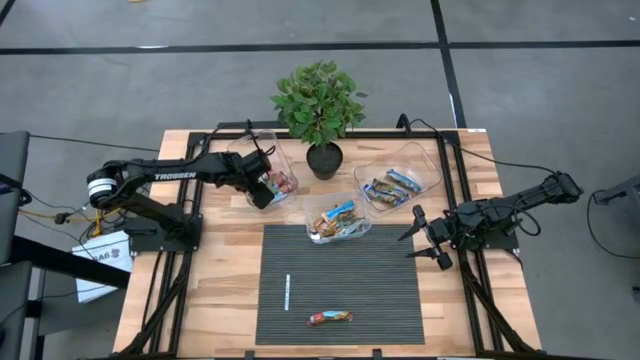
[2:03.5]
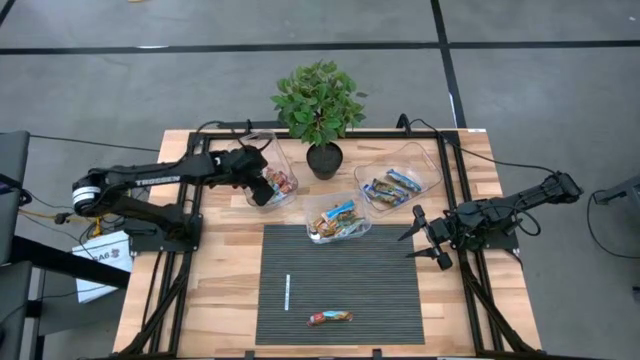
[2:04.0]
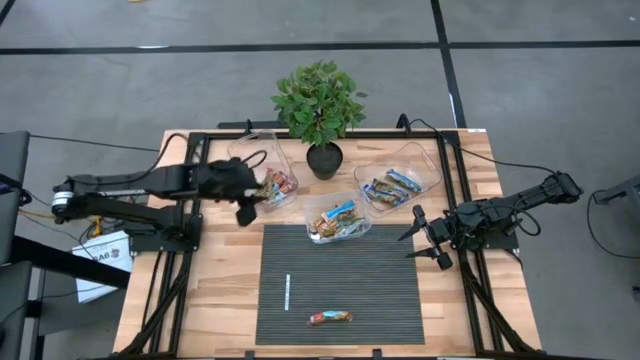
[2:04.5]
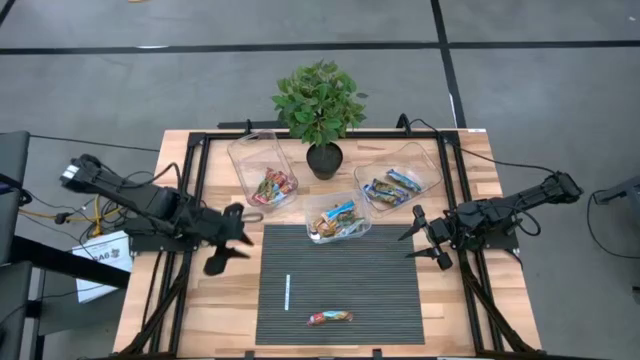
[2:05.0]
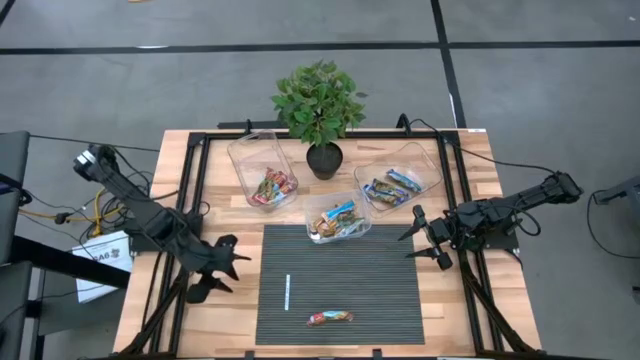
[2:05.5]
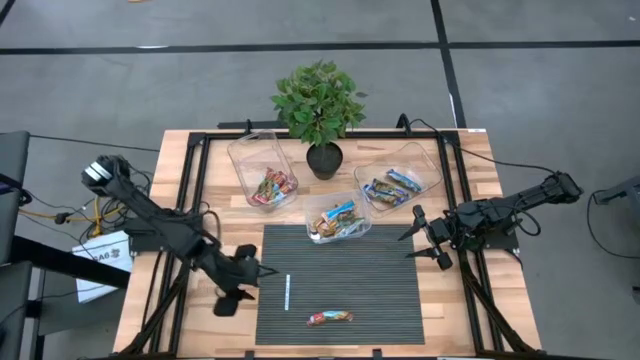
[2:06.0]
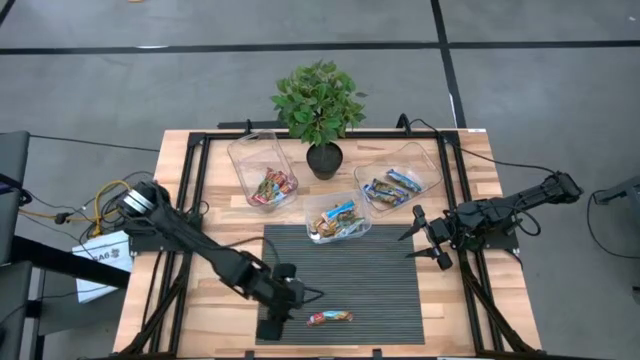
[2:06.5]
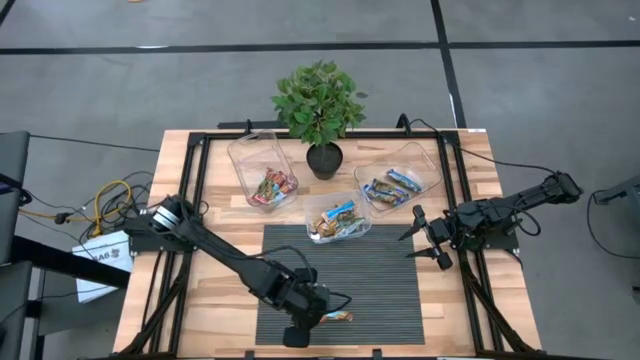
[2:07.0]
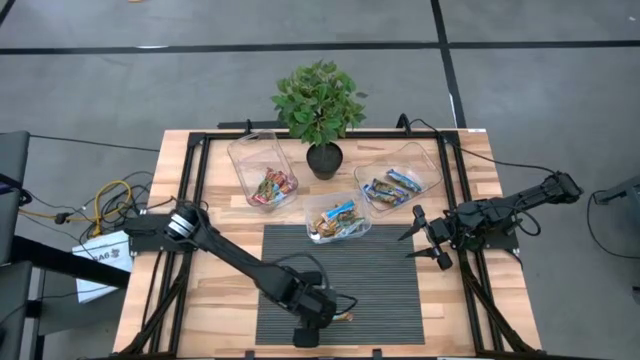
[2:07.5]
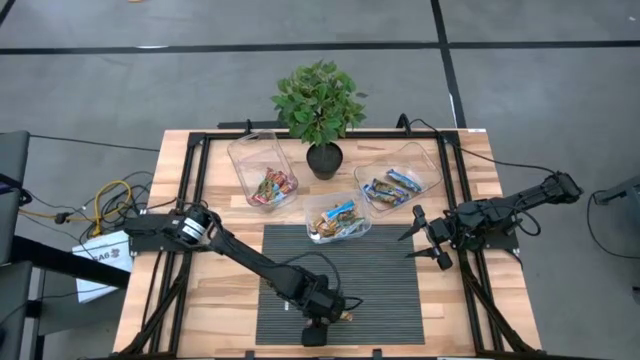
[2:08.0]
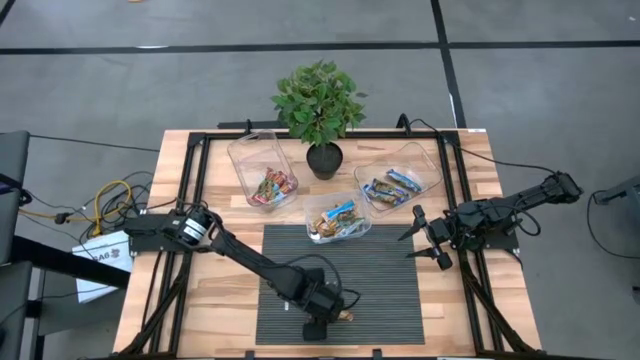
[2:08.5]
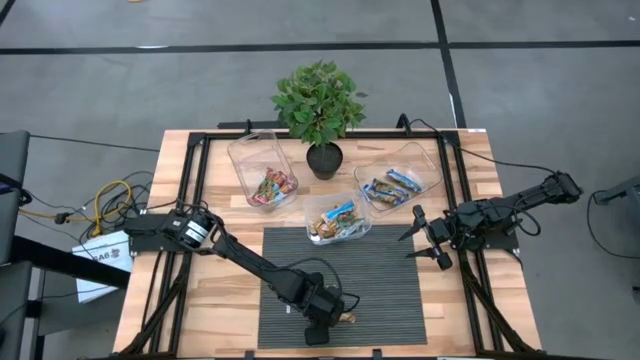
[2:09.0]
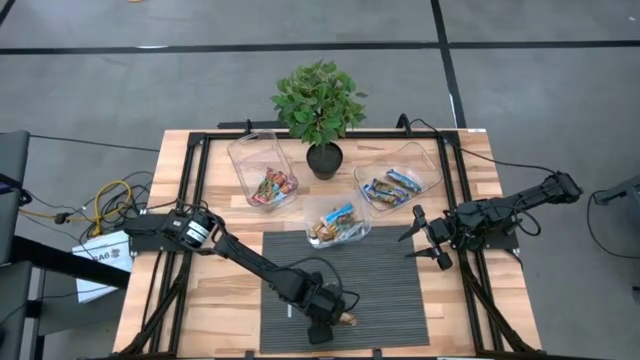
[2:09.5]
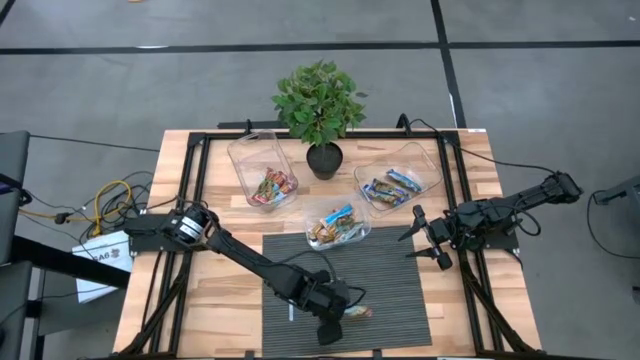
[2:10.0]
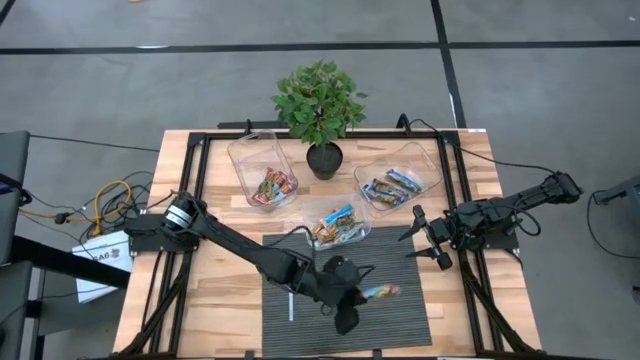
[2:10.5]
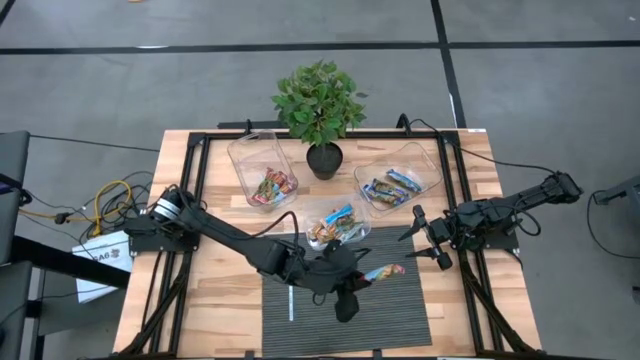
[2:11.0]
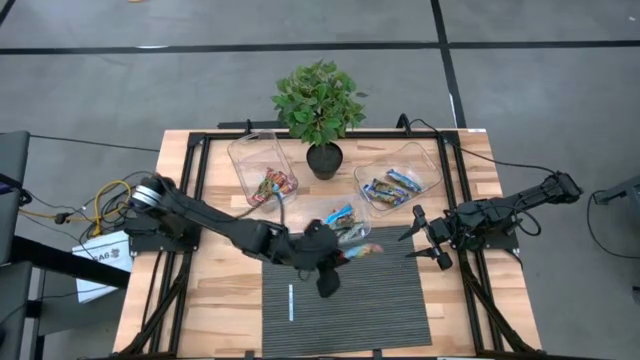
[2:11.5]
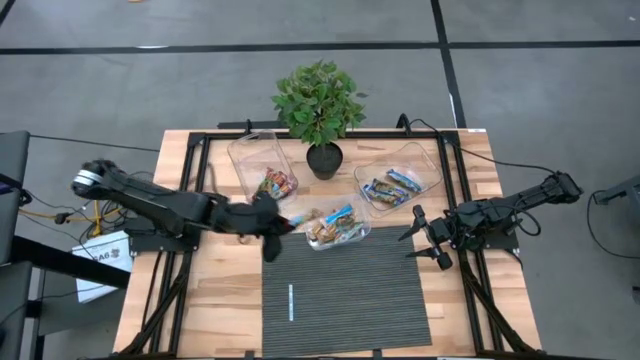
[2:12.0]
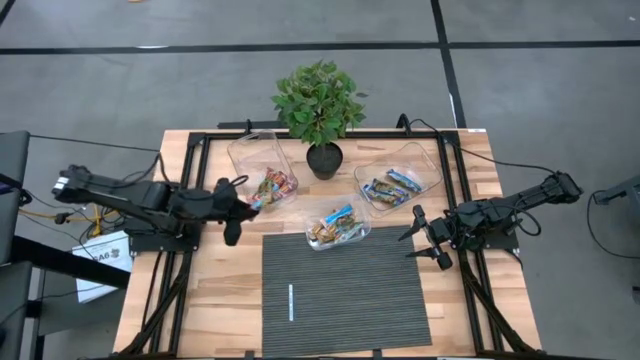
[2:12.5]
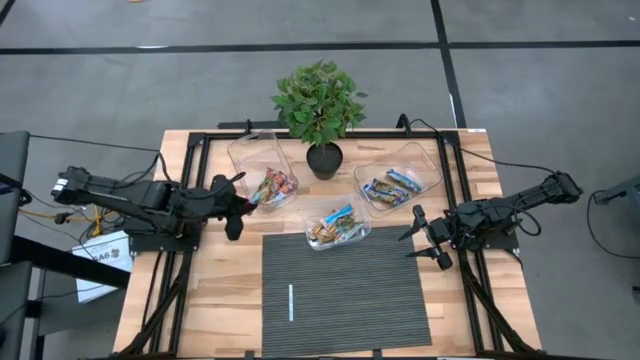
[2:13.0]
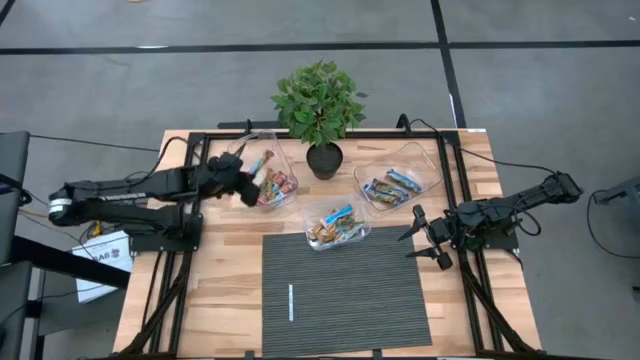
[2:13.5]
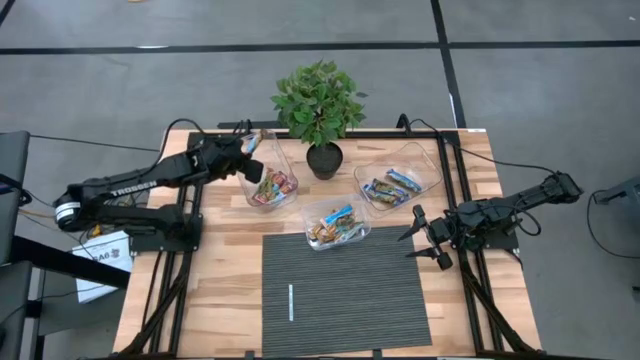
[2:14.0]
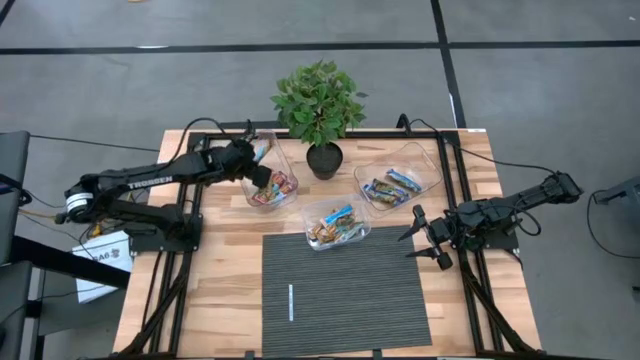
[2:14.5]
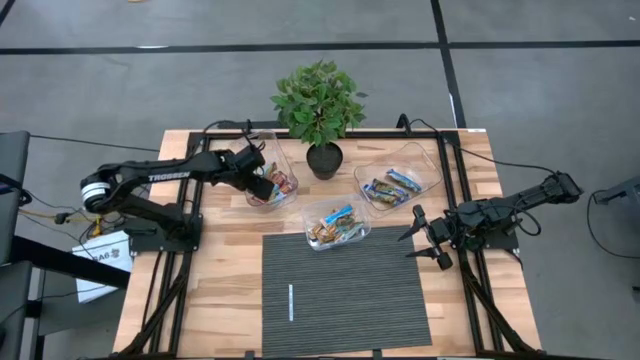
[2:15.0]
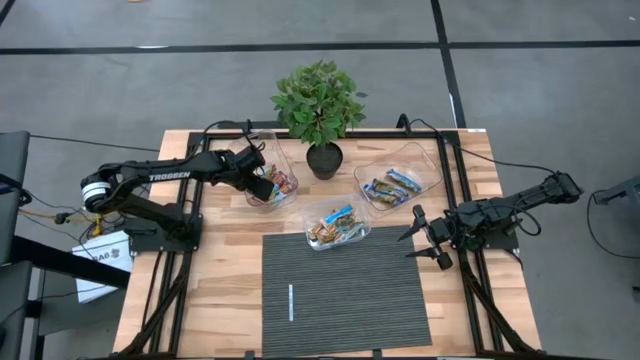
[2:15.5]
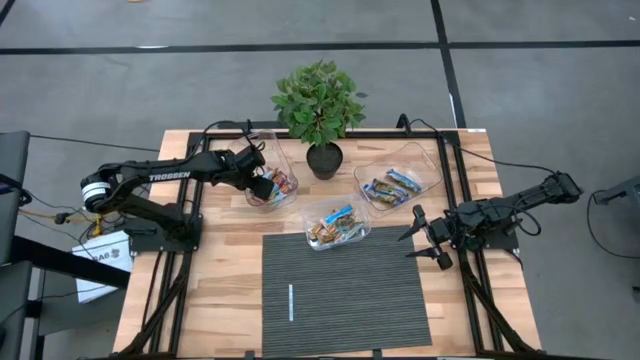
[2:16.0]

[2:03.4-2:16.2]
Task: Pick and place Granola Bars by type
Put the red granola bar into the left transparent bin

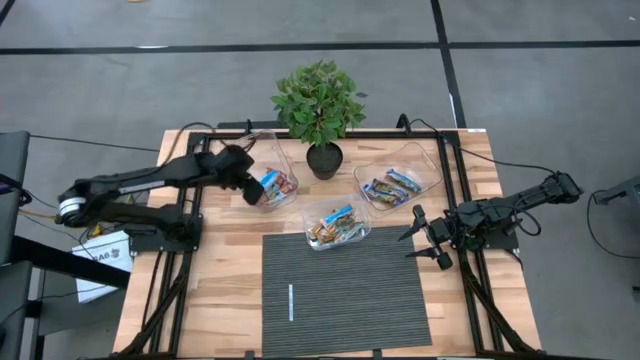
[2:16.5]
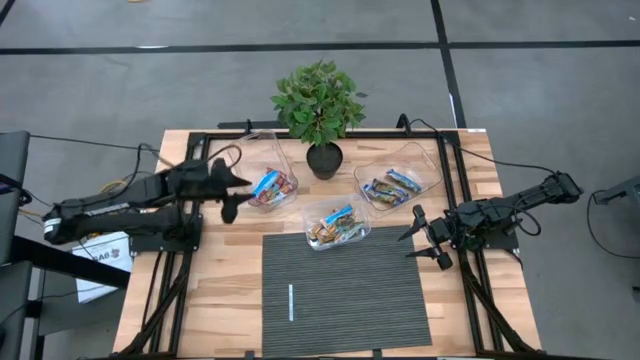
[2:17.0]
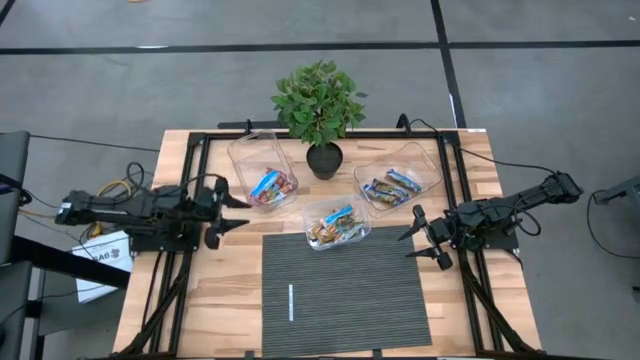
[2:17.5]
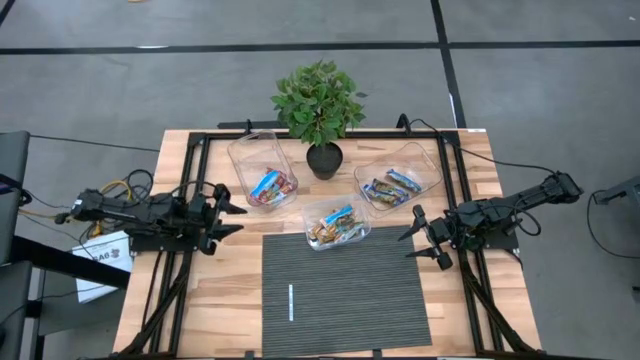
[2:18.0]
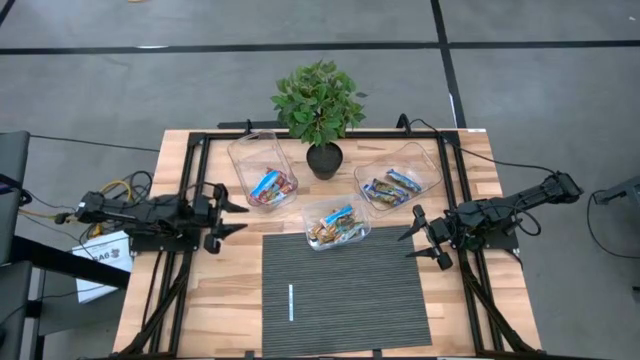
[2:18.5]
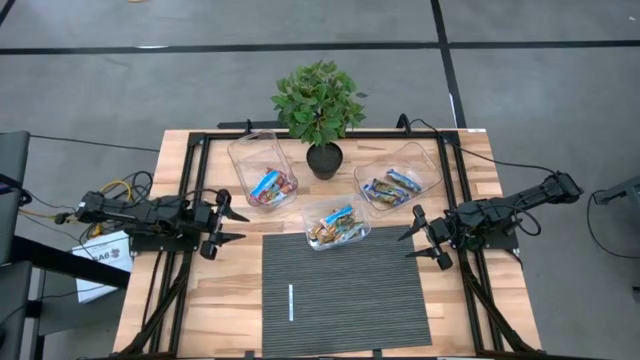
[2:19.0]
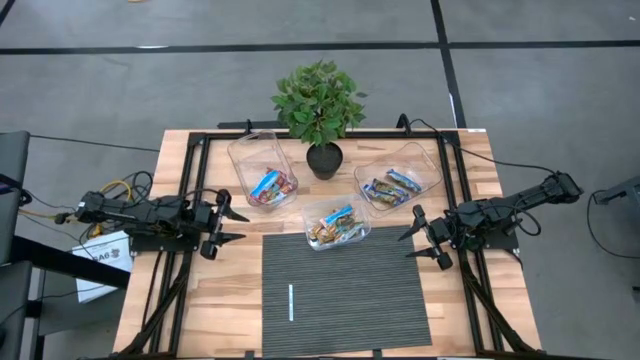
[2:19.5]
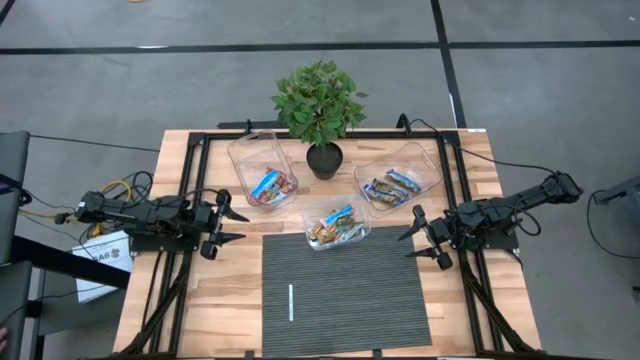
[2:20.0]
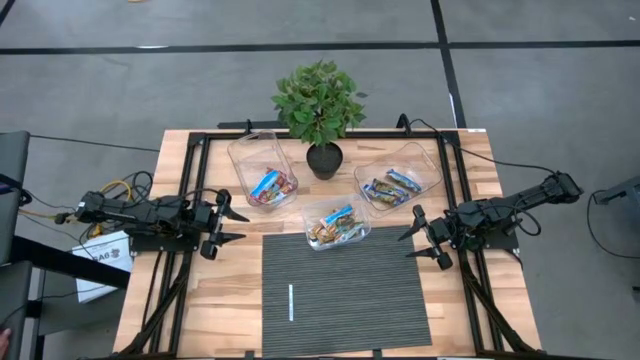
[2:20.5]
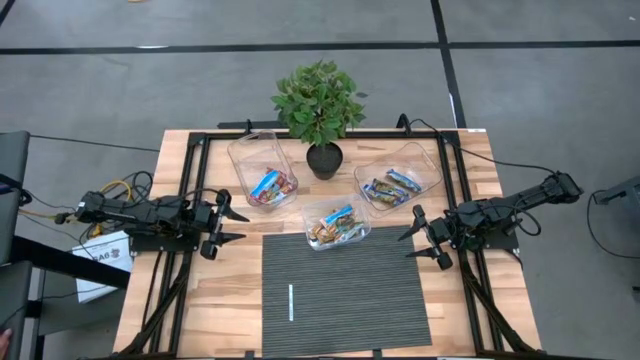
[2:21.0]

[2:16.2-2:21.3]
Return to Home Position

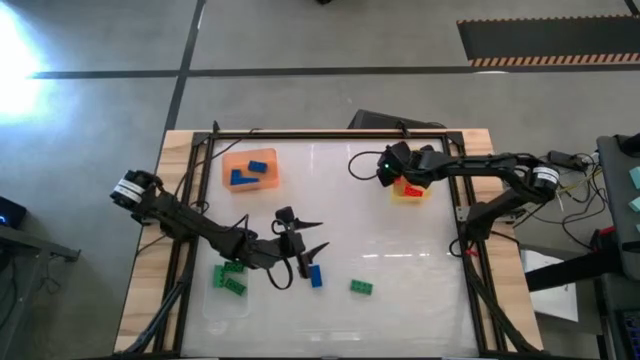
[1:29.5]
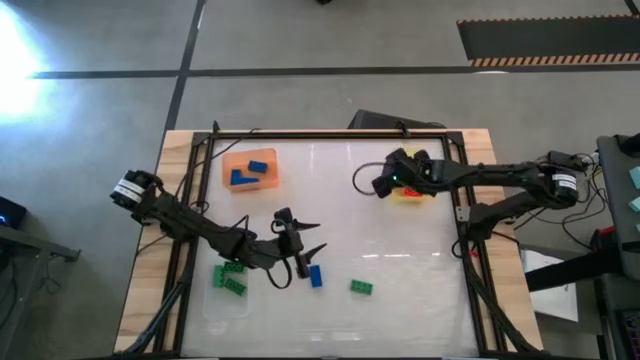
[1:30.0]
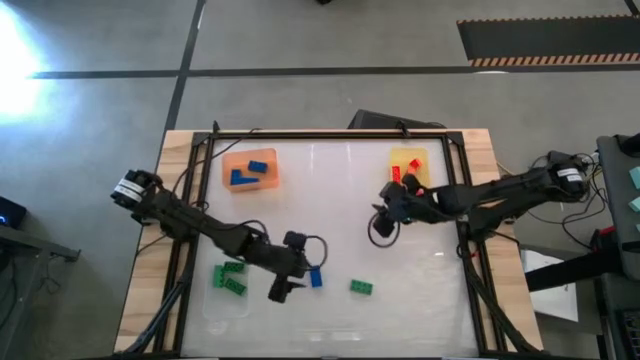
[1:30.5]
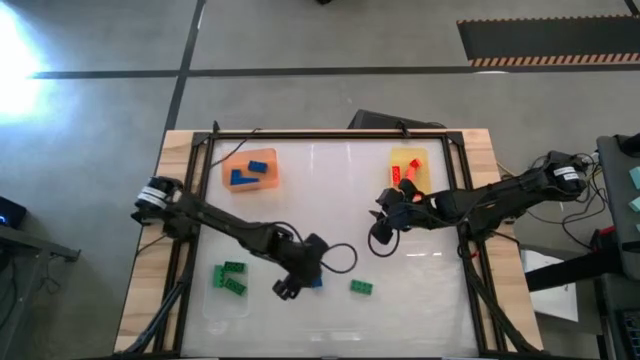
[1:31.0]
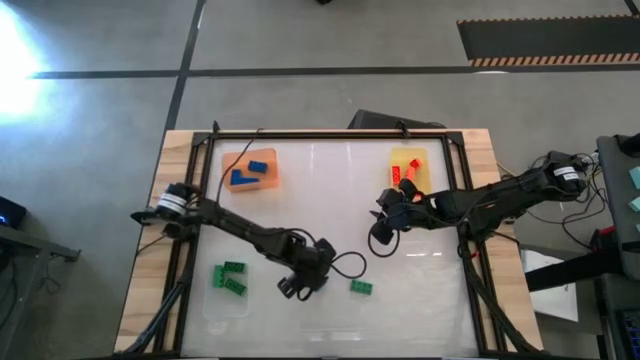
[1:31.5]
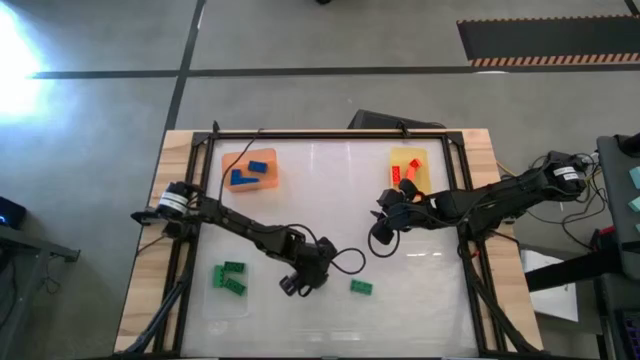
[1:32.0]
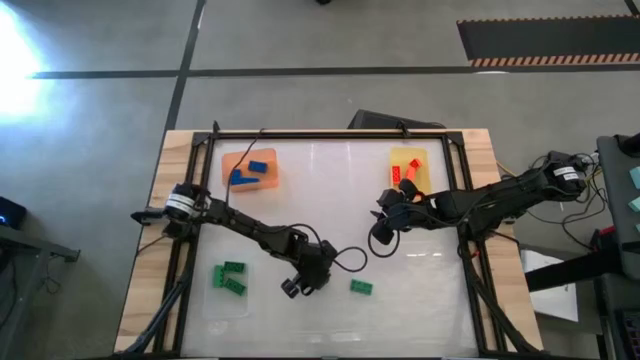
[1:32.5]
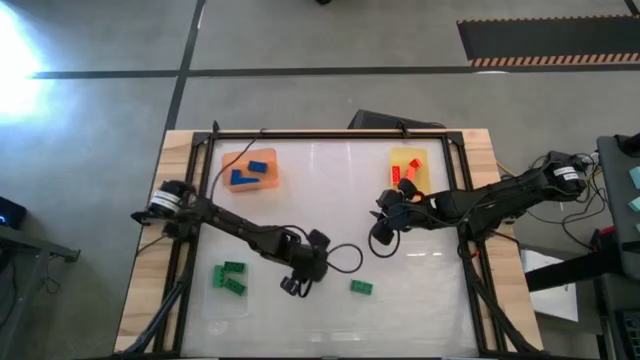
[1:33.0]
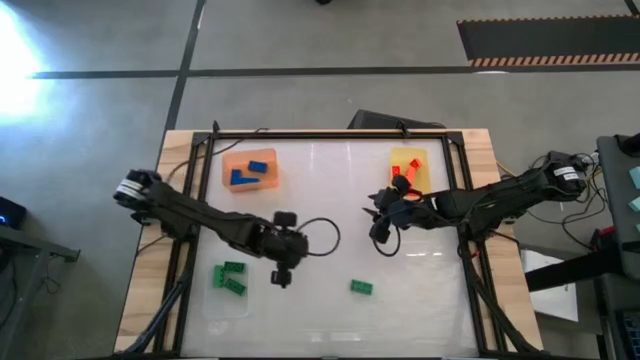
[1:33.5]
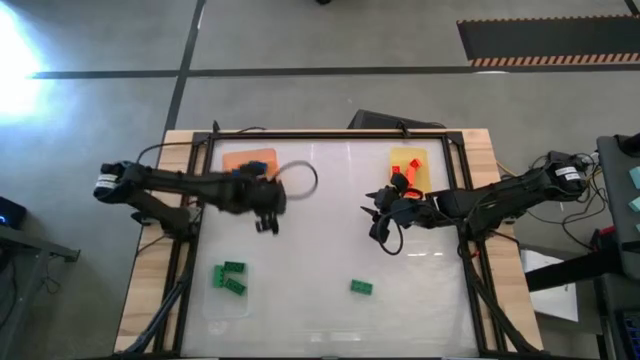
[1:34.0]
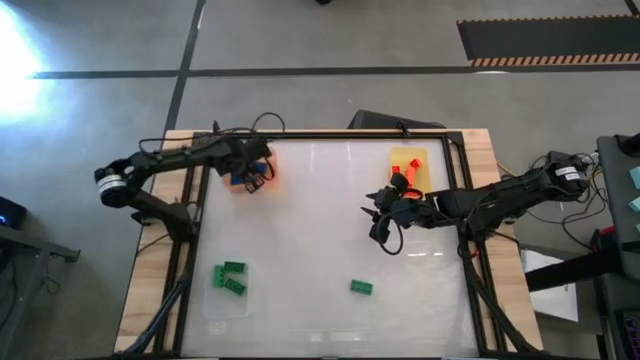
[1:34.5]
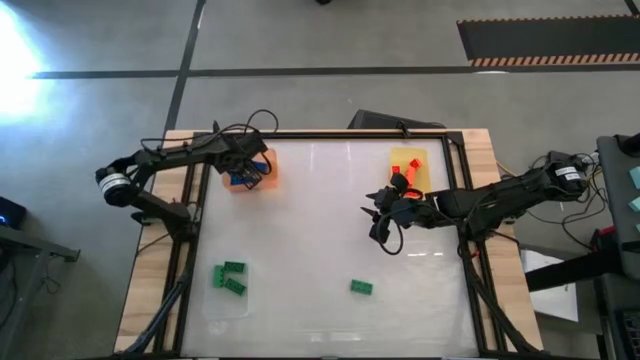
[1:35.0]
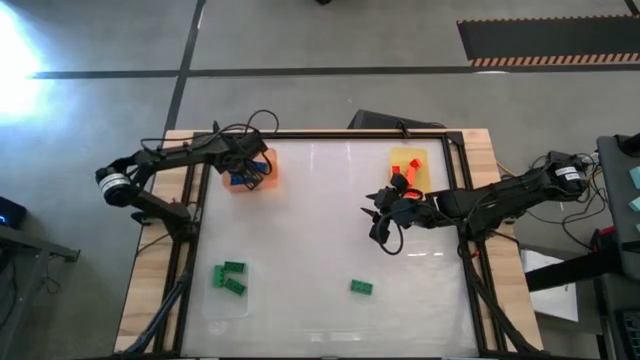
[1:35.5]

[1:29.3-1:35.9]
Task: Sort & place blocks by color
Put the blue game piece into the orange bin
